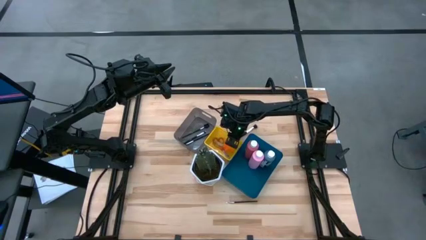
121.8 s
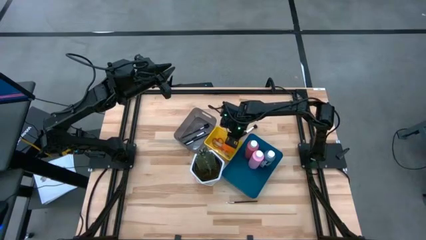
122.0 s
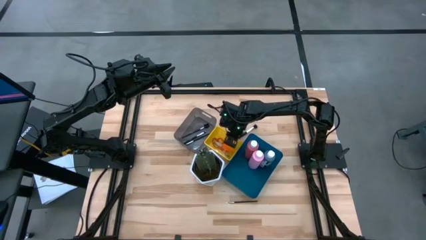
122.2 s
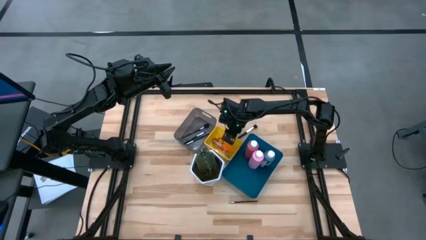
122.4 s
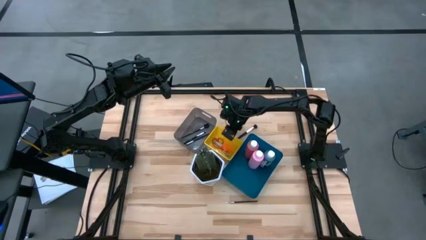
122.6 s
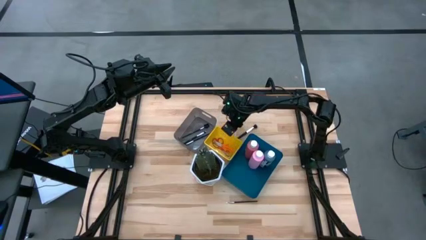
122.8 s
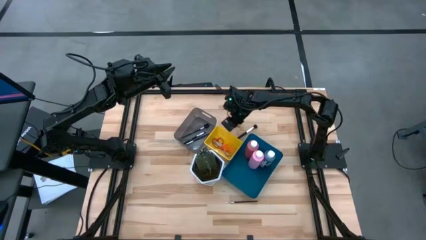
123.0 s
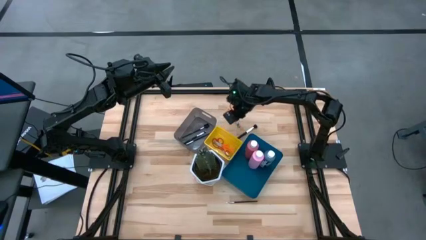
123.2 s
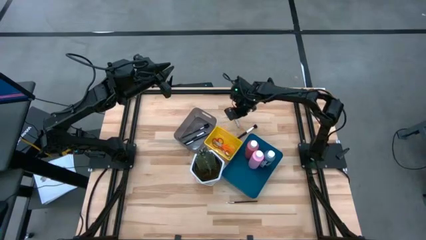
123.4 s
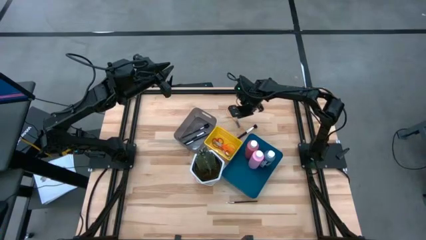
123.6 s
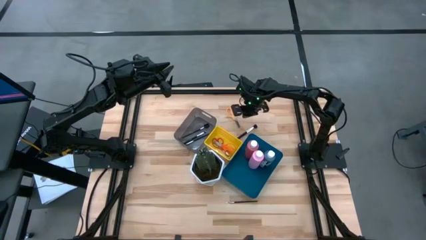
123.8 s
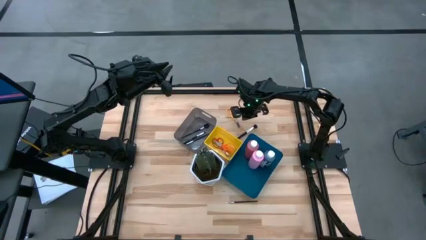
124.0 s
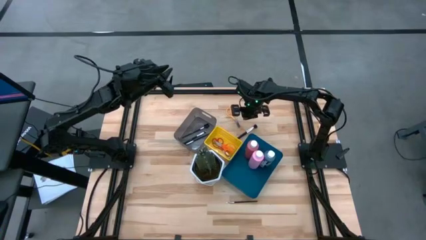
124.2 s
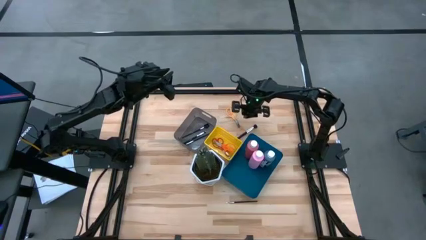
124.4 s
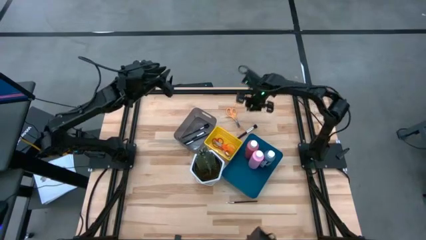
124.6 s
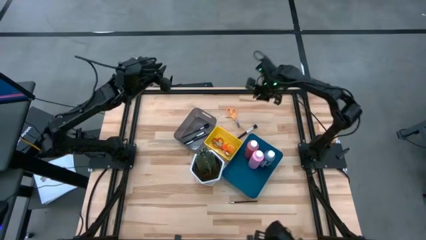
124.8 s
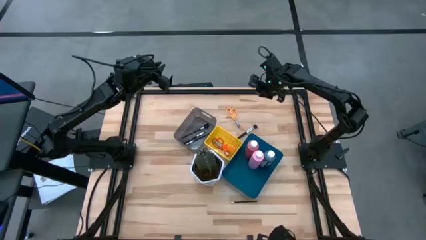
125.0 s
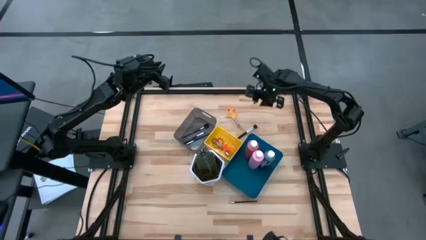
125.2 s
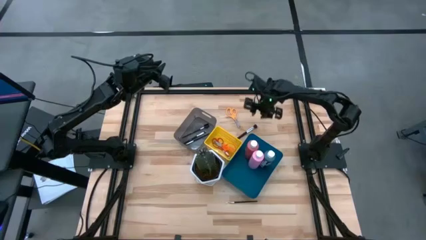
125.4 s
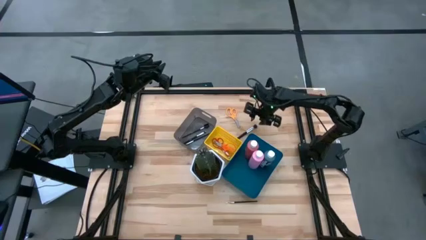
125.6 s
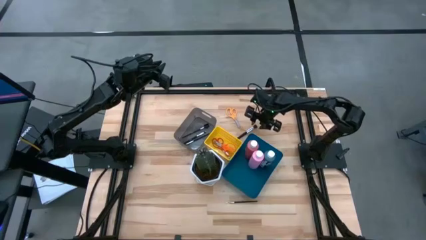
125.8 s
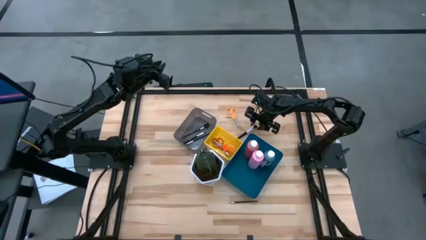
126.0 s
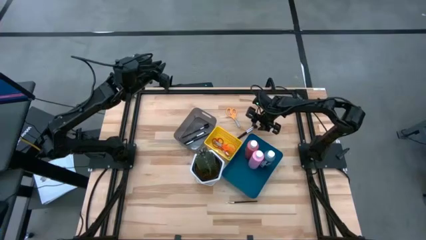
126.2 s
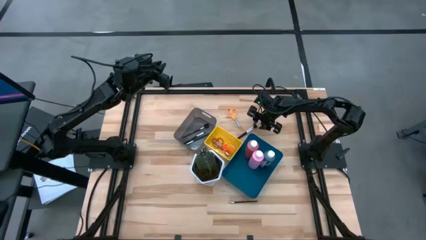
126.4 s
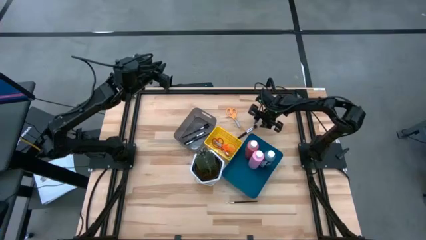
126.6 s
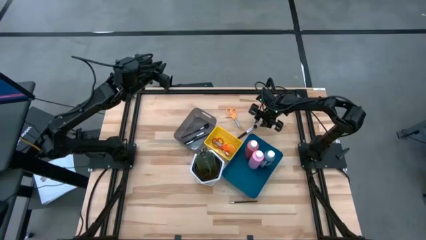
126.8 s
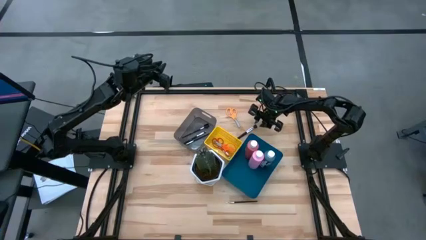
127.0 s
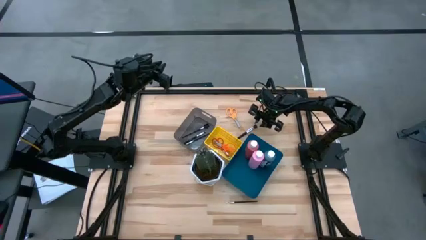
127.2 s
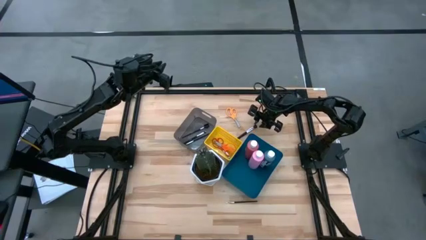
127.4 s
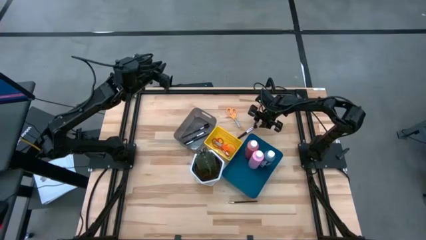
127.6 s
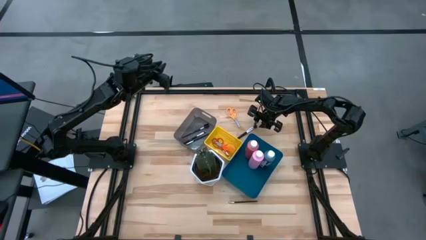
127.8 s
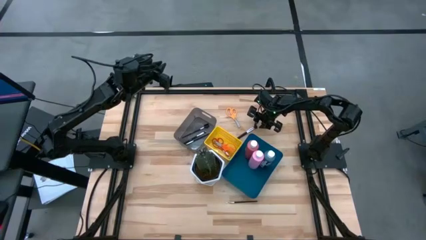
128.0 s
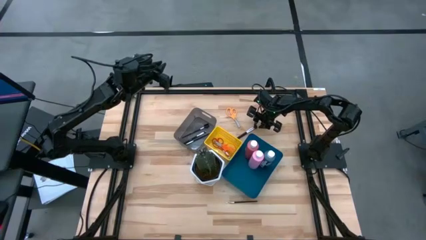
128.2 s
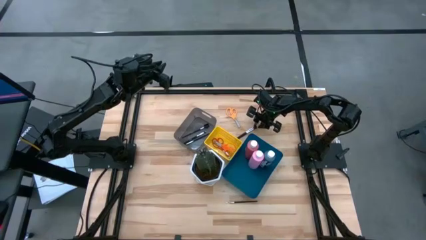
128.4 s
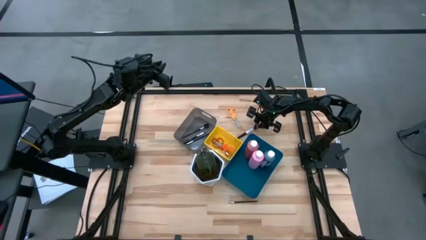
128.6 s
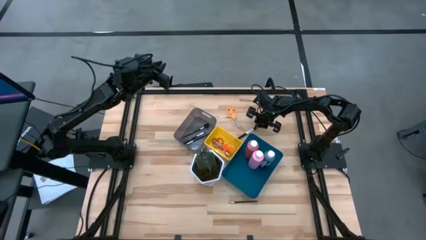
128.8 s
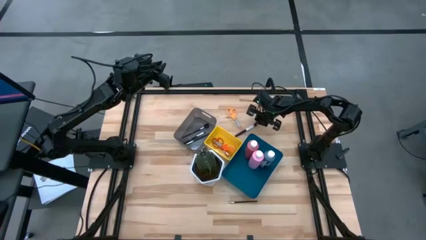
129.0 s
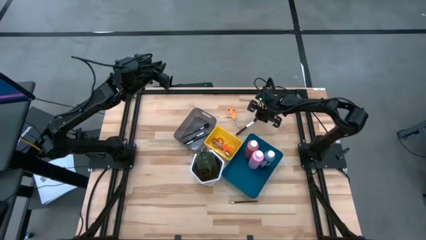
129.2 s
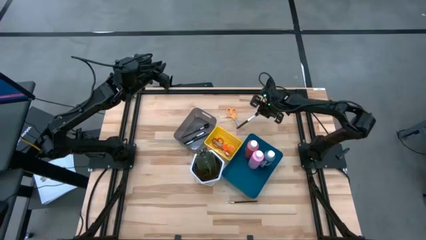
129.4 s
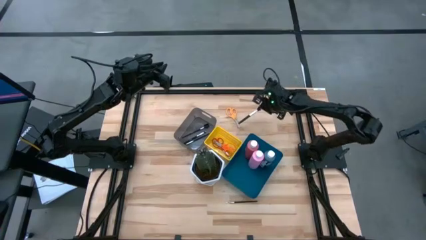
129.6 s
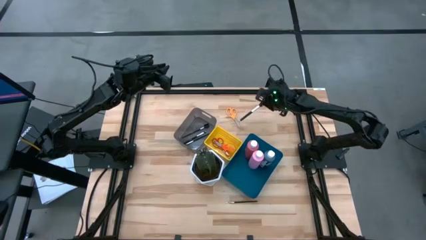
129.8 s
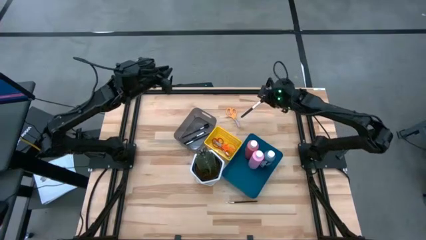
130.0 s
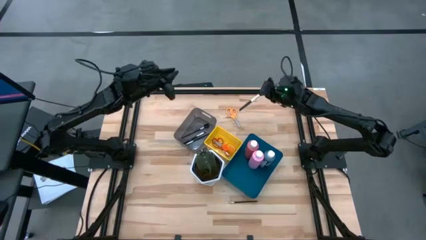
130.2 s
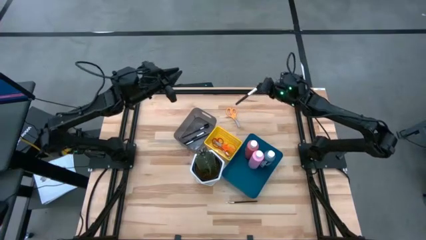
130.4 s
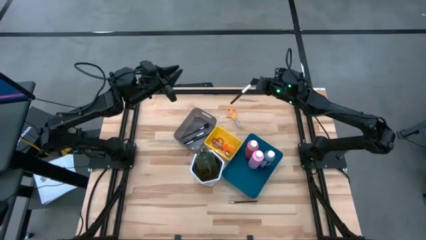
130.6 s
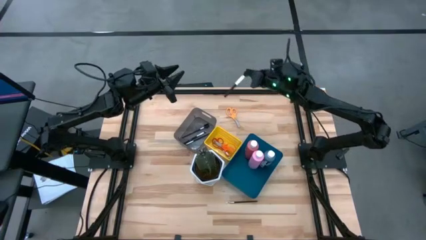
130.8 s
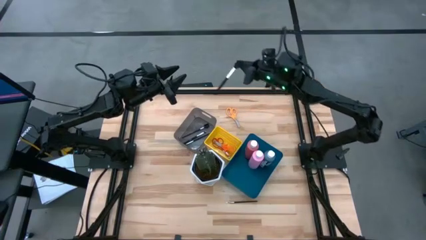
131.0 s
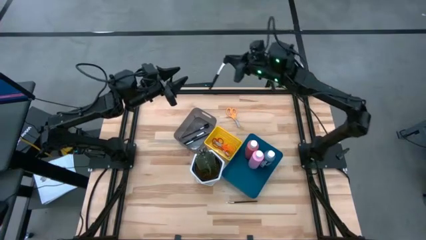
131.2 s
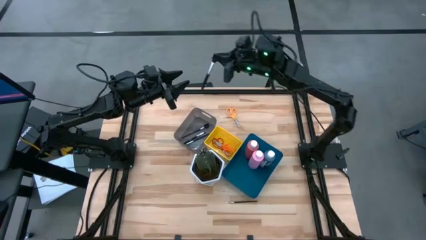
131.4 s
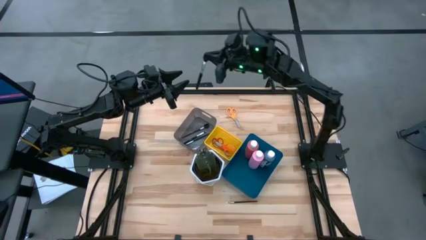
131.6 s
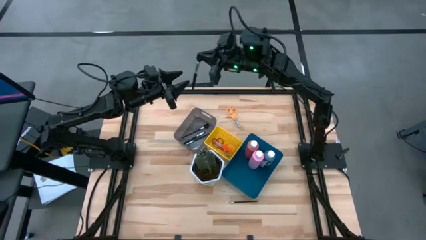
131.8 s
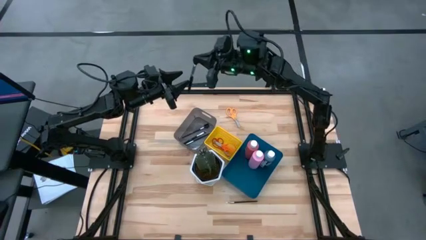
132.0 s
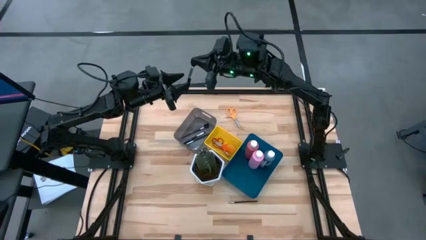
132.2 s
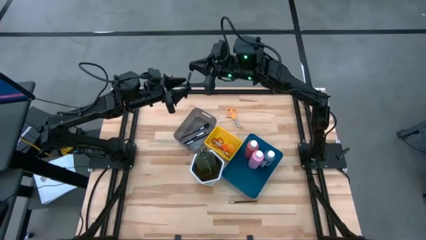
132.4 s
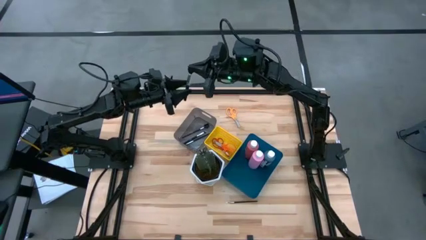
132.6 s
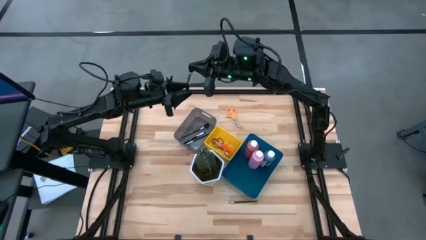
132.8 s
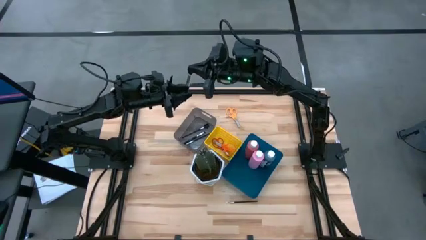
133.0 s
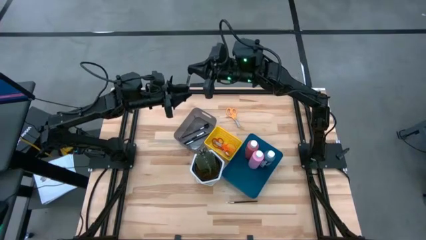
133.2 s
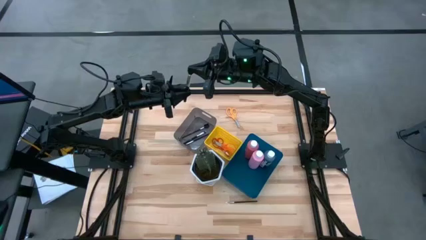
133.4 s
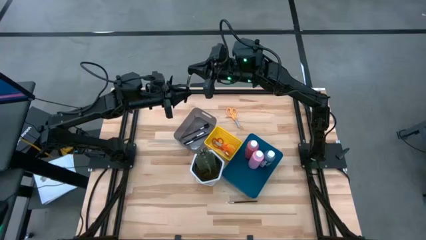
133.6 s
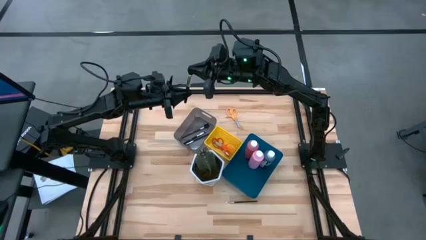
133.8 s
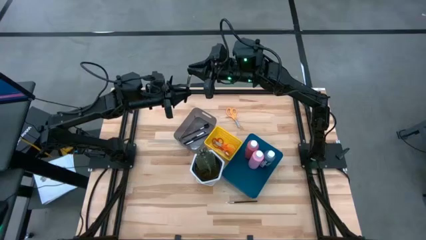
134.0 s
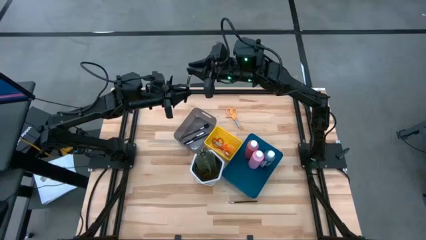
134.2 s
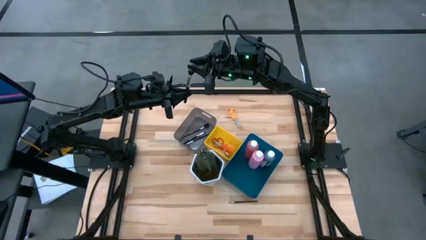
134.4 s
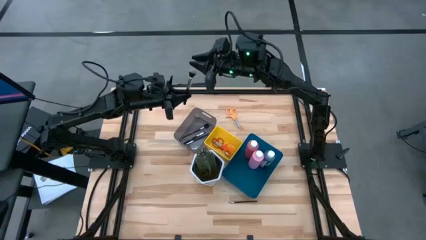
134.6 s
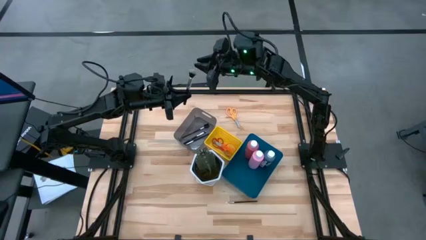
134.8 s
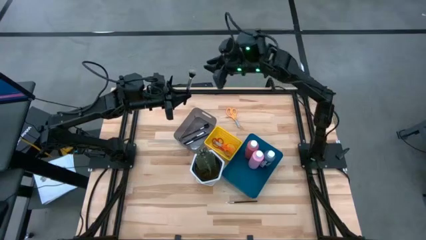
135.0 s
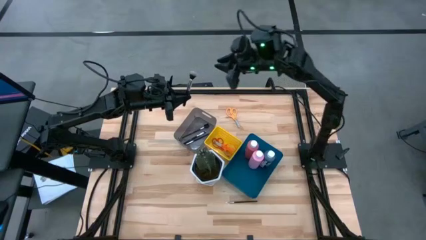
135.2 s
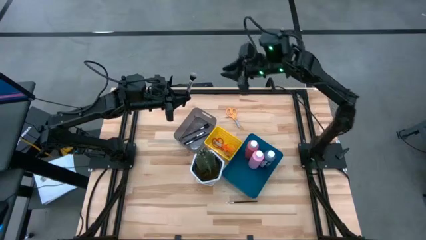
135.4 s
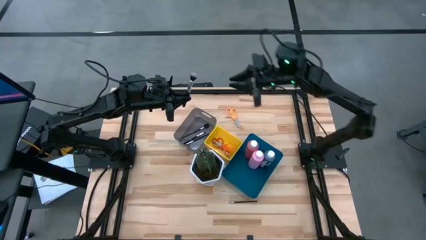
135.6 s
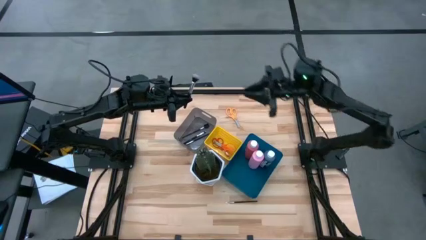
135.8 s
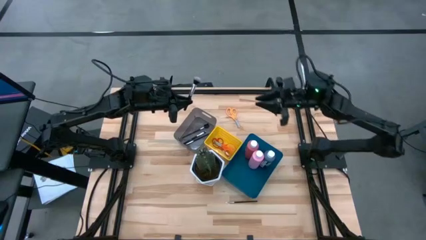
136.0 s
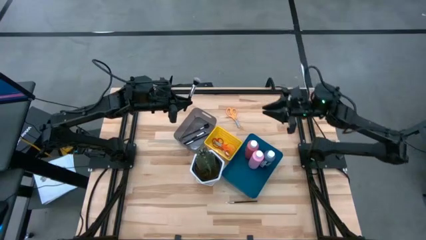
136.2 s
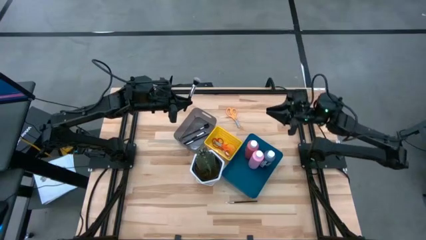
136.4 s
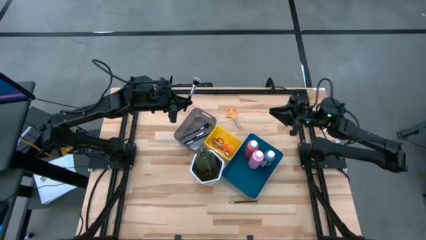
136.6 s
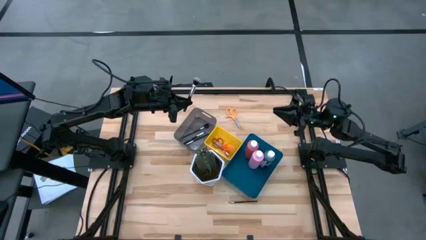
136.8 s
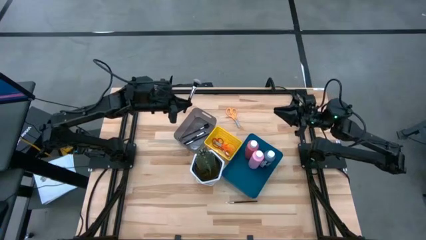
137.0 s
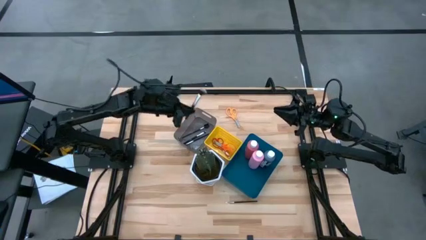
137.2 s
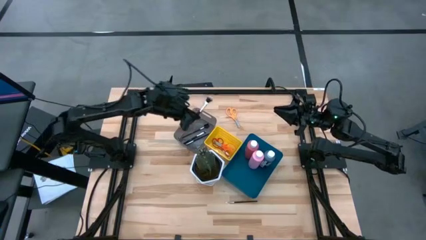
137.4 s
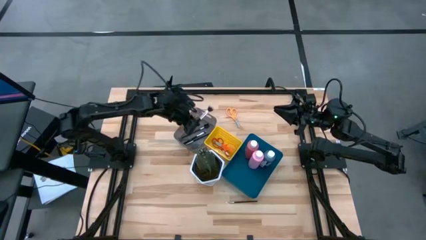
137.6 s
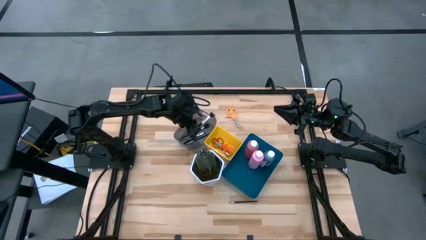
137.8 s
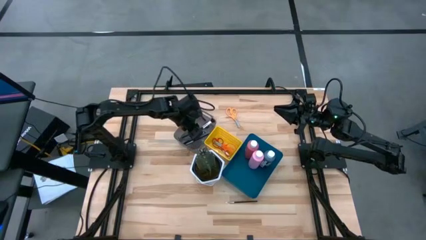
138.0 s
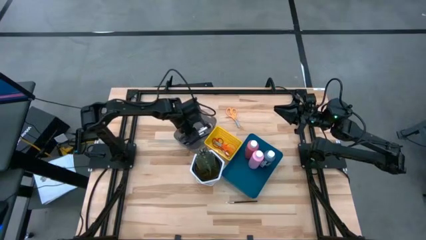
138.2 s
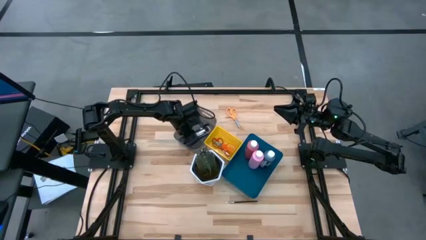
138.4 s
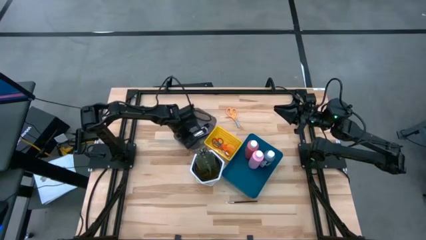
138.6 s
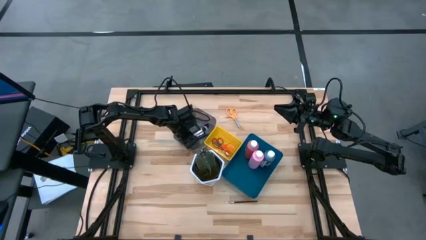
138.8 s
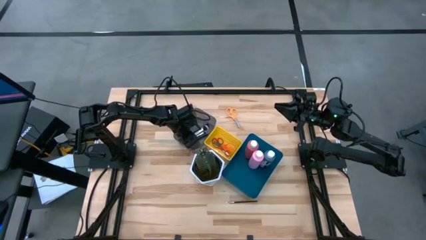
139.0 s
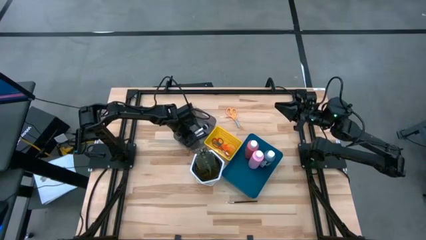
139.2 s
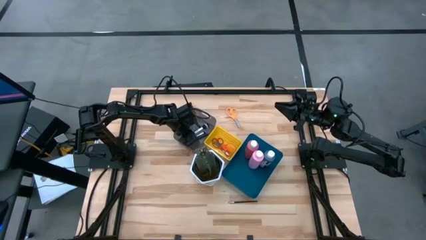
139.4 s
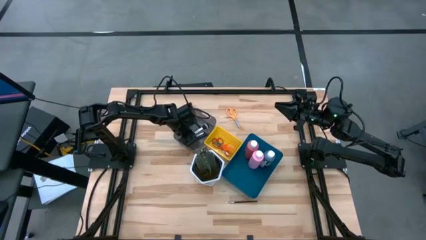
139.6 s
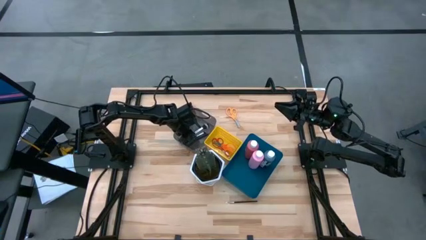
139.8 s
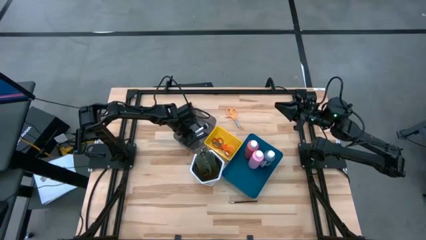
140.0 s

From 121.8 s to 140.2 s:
Task: Pick & Place Paint Supplies
Put the top makeup brush into the black bin
